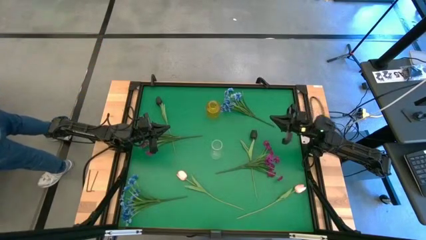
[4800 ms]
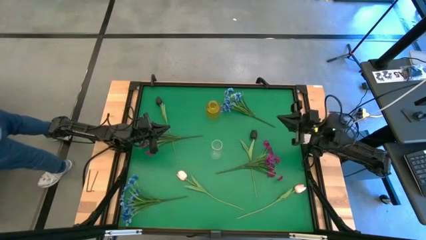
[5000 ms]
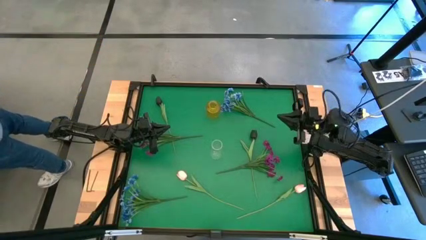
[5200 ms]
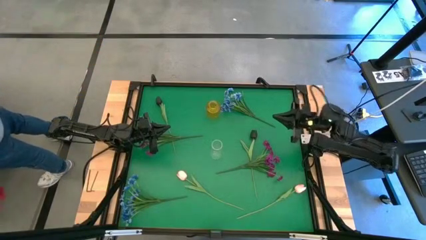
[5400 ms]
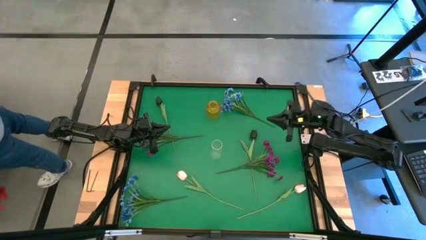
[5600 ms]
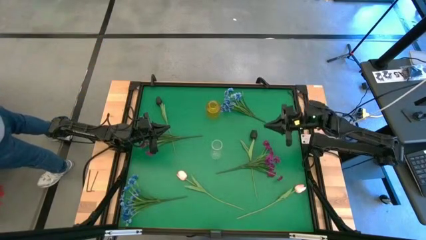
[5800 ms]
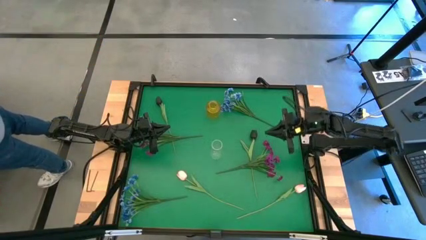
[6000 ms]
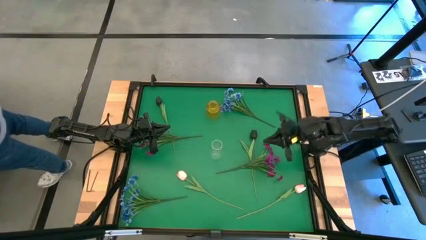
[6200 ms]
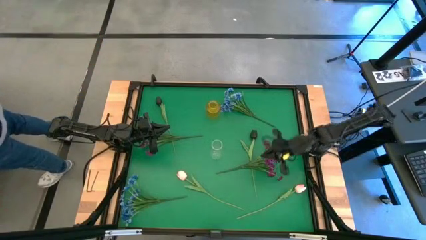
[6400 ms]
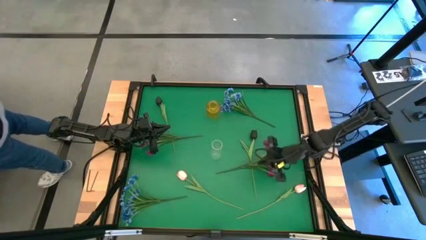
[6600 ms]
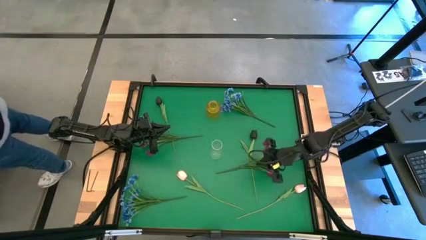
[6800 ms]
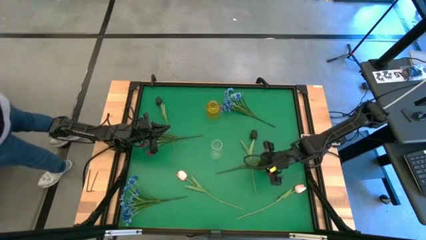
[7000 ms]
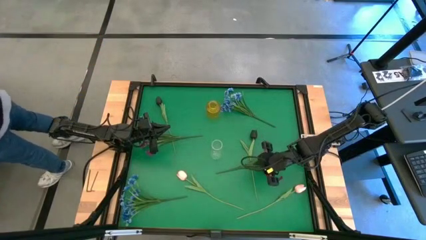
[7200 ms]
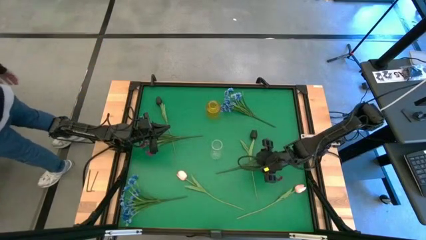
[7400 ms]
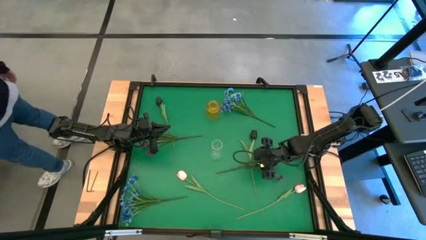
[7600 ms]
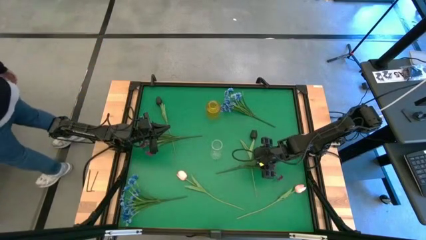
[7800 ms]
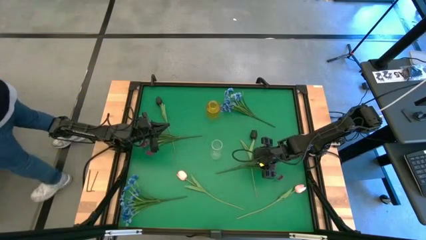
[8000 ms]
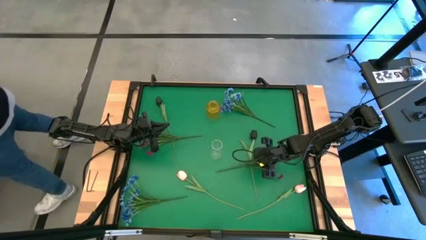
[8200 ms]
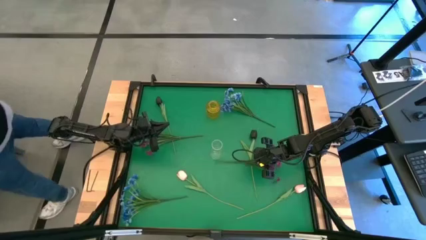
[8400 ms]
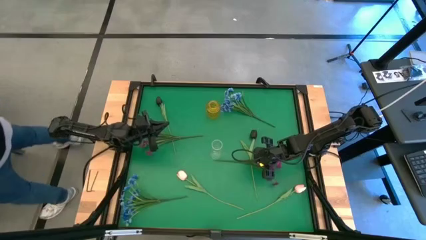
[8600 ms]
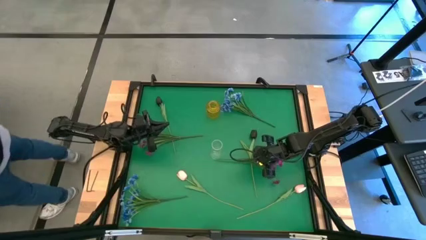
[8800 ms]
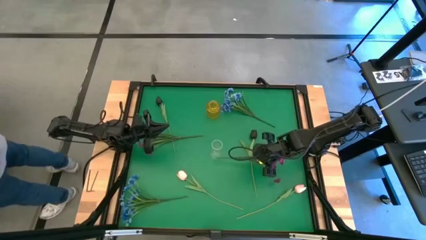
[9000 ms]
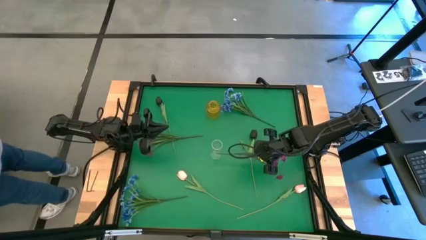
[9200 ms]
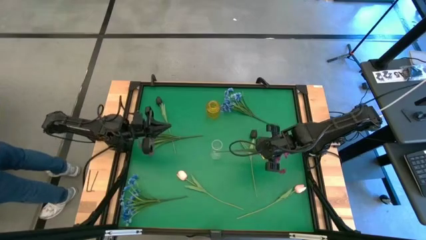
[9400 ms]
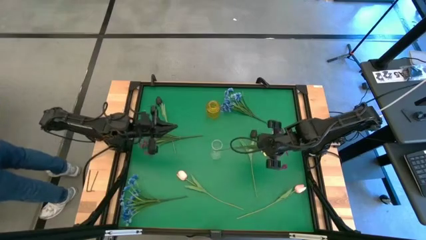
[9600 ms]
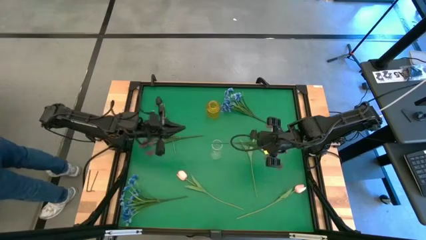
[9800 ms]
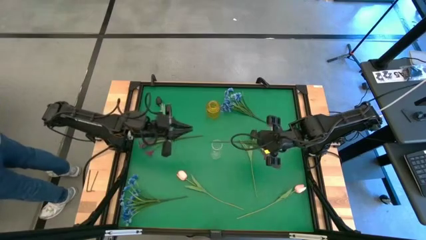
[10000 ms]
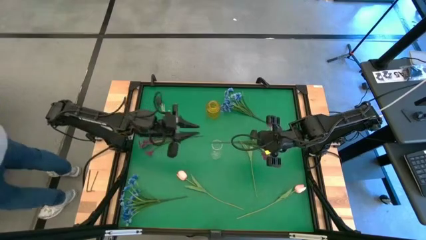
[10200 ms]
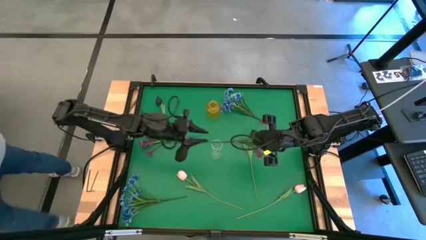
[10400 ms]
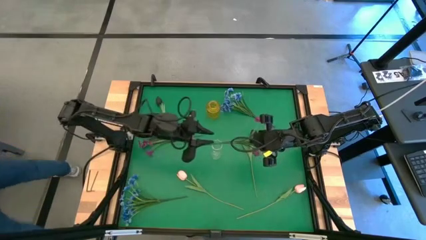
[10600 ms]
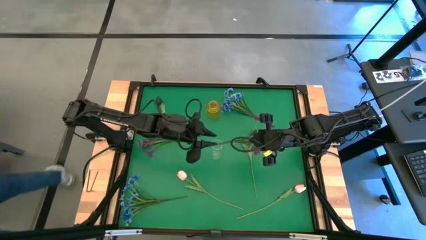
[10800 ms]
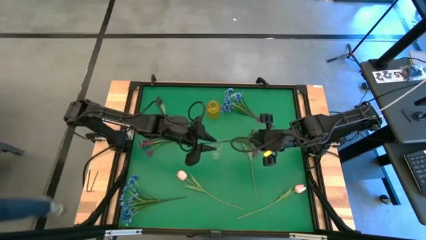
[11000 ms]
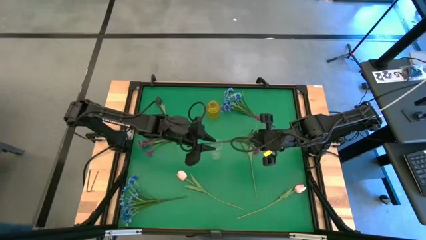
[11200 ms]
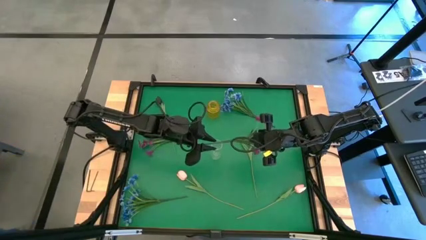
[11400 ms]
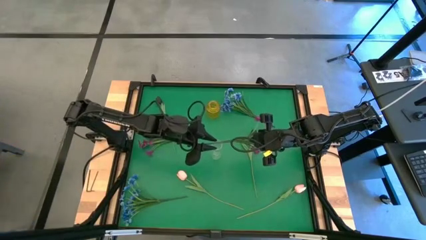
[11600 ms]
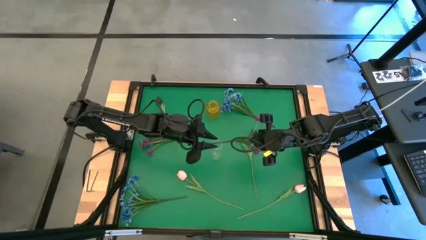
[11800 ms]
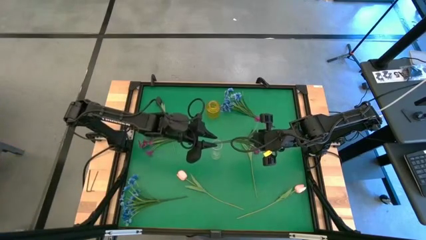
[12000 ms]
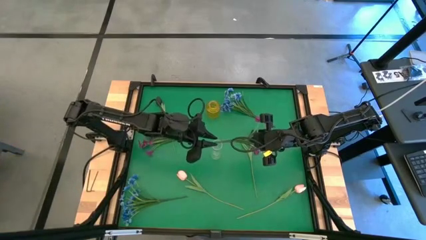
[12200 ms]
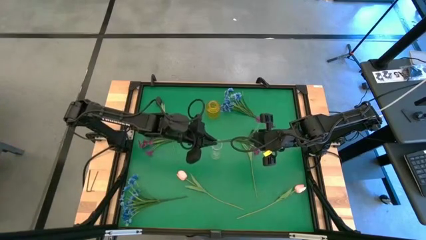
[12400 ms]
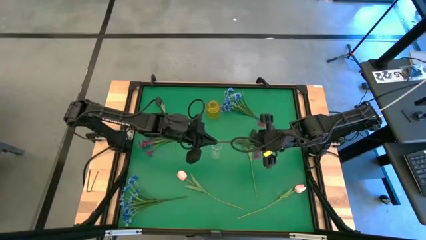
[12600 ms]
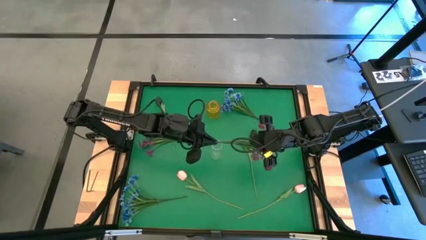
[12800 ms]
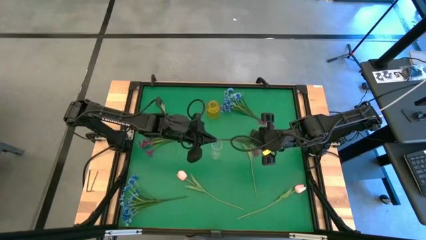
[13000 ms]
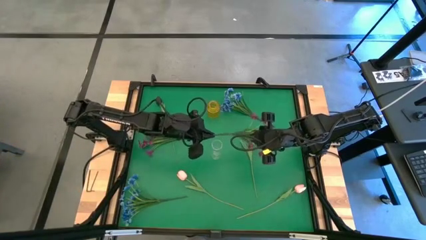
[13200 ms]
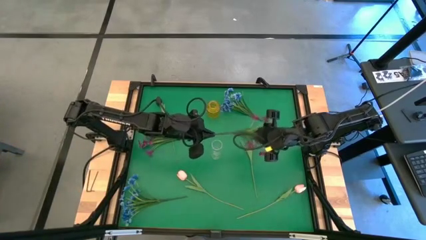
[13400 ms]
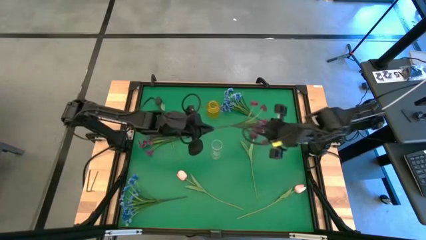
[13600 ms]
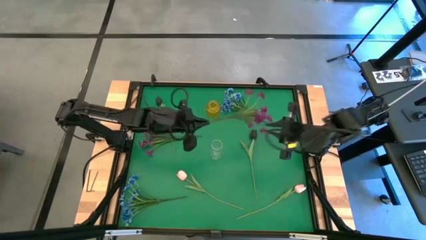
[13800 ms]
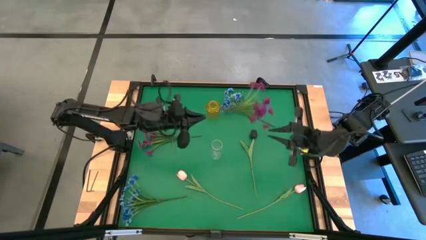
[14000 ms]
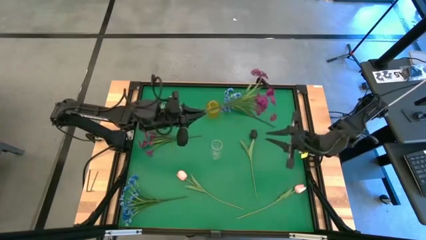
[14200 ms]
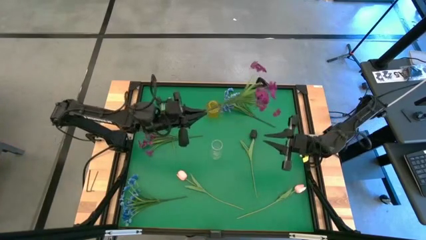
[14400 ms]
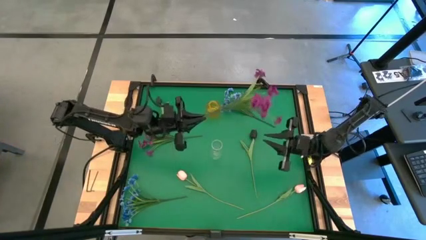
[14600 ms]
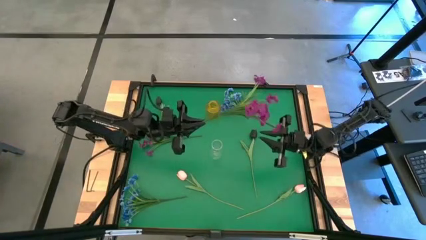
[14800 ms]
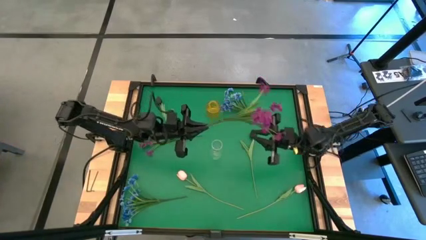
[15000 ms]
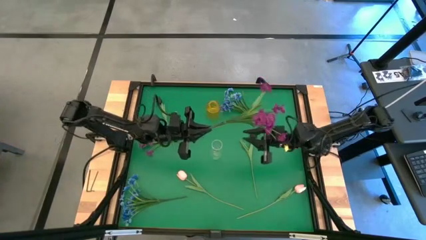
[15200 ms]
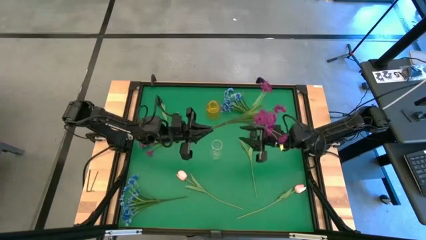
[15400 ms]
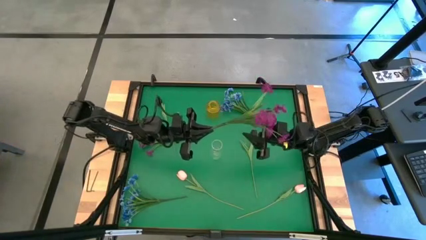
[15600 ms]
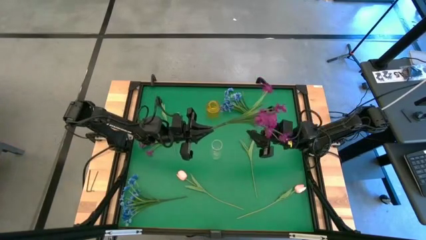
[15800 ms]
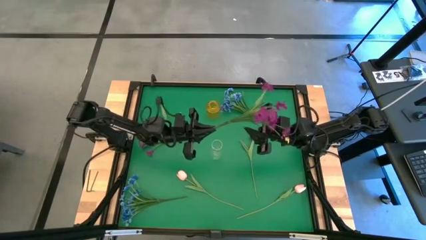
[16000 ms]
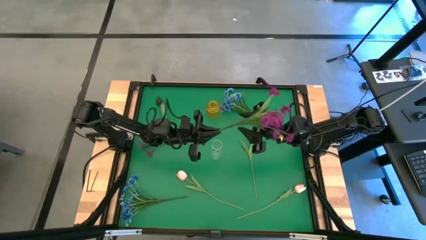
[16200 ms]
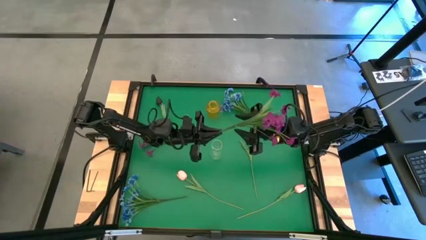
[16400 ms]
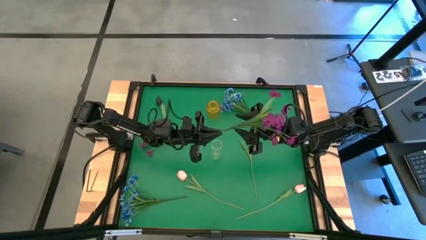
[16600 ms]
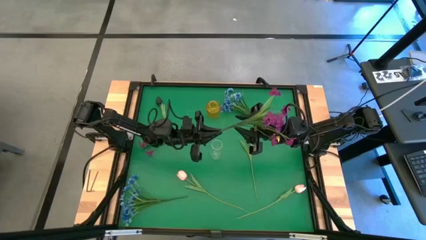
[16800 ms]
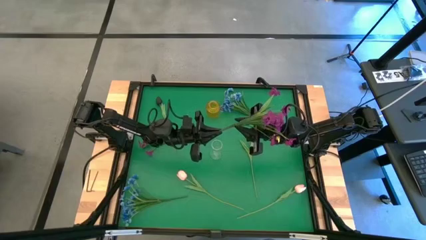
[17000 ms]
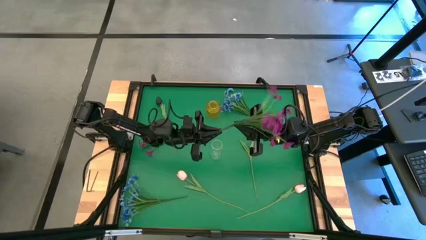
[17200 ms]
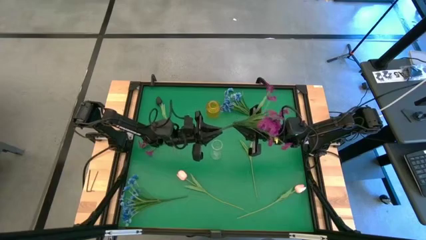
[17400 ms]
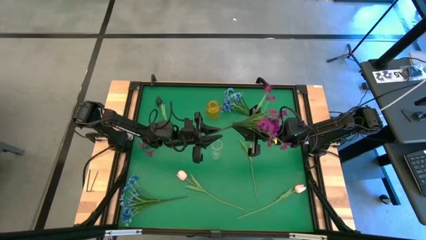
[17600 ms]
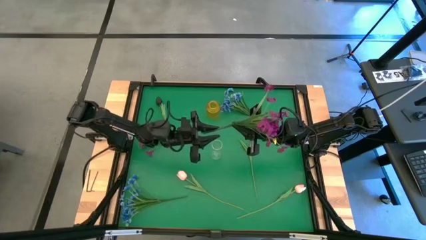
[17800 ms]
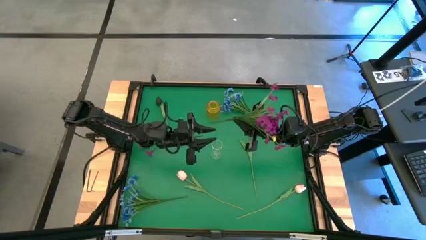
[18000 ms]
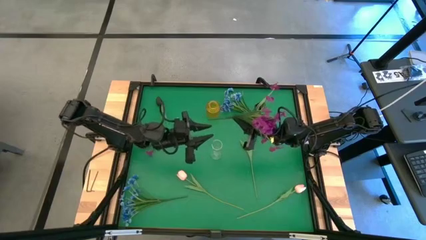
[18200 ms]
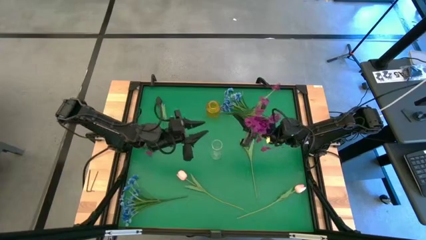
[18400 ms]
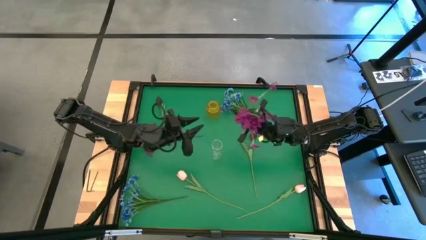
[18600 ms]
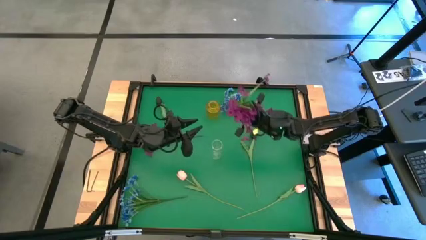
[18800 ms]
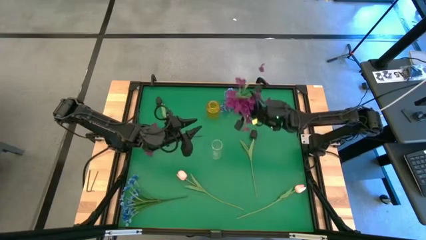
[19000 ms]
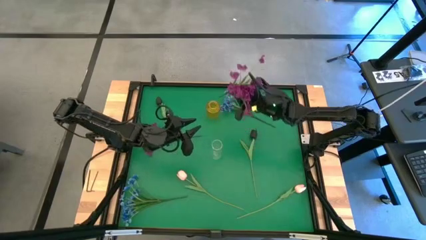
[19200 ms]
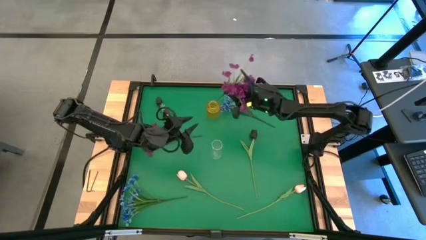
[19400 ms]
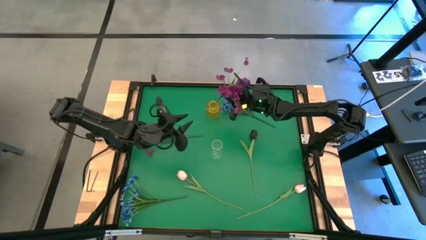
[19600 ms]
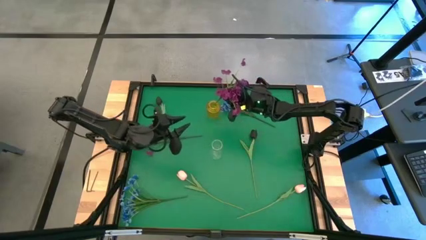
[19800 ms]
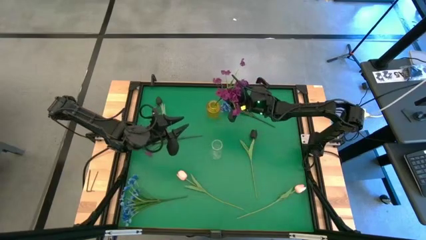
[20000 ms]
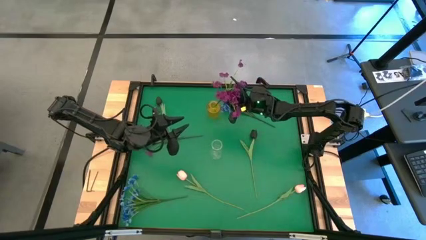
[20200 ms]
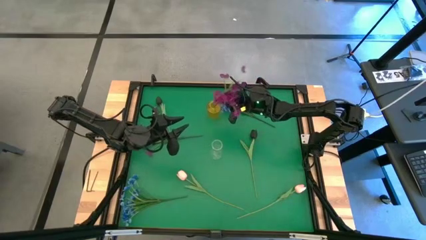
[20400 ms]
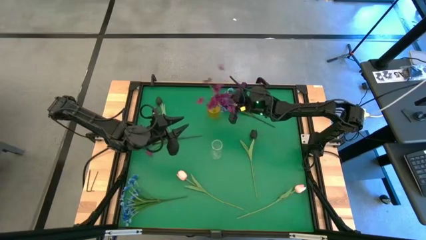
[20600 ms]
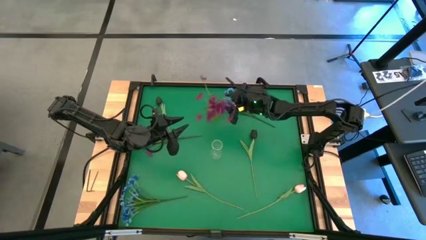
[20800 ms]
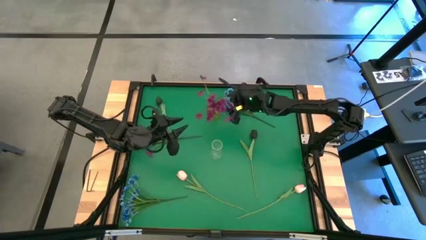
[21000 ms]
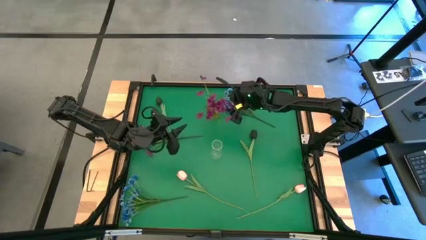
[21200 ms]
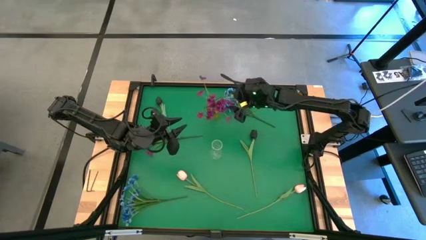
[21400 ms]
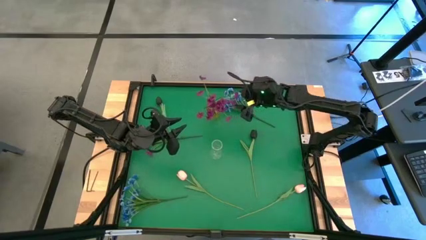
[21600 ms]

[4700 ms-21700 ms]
Task: Sort flowers into vase by color
Put the right purple flowers into the yellow vase
